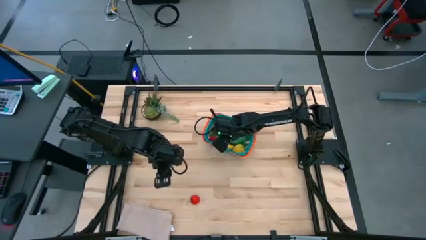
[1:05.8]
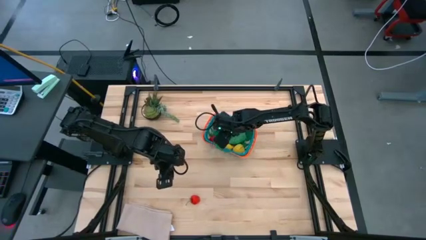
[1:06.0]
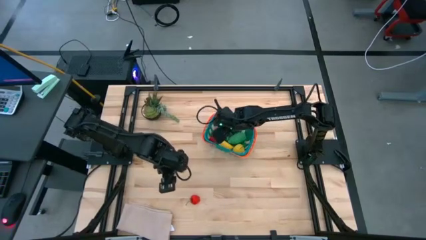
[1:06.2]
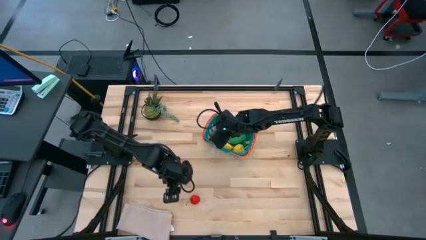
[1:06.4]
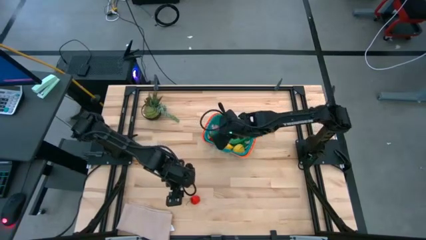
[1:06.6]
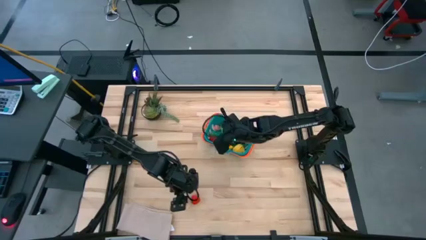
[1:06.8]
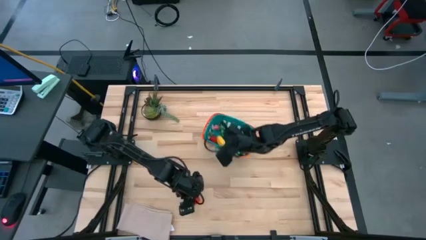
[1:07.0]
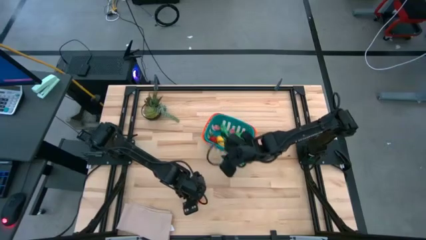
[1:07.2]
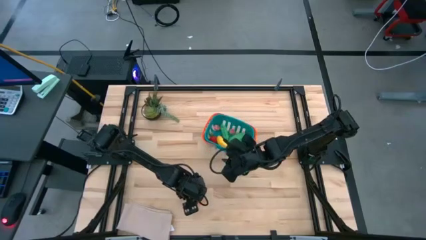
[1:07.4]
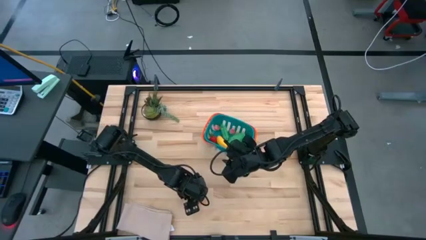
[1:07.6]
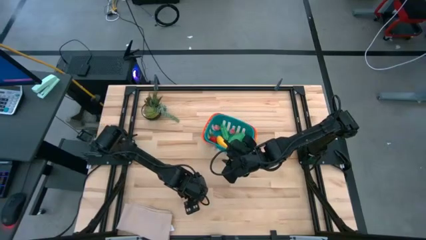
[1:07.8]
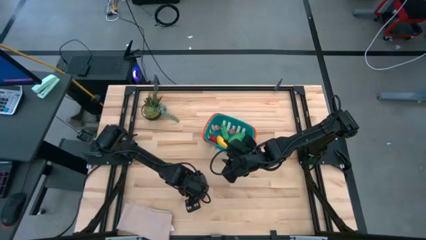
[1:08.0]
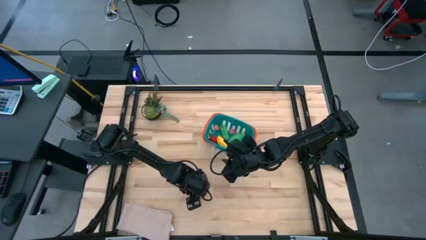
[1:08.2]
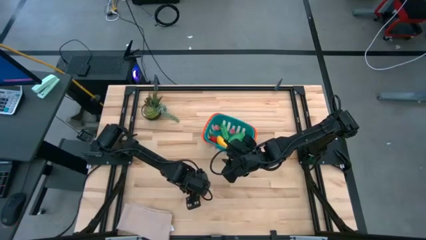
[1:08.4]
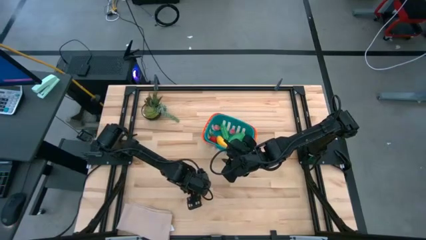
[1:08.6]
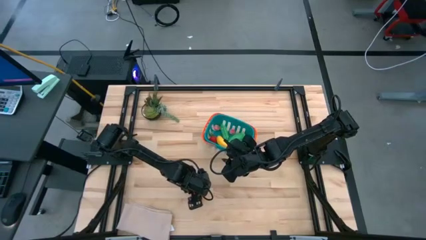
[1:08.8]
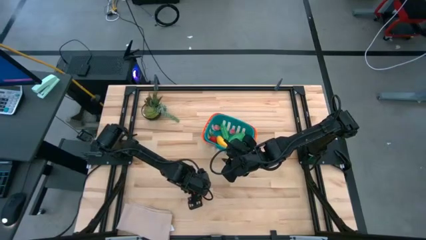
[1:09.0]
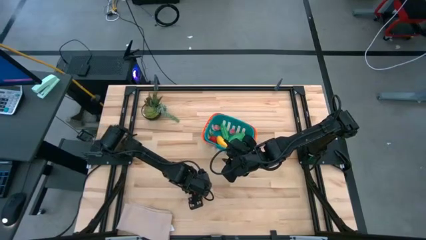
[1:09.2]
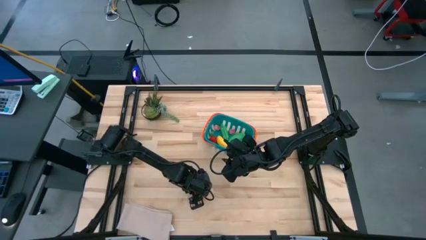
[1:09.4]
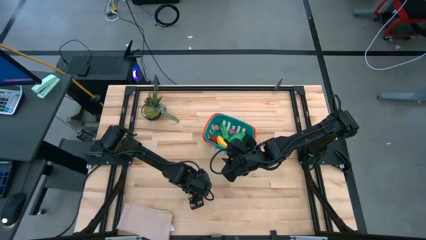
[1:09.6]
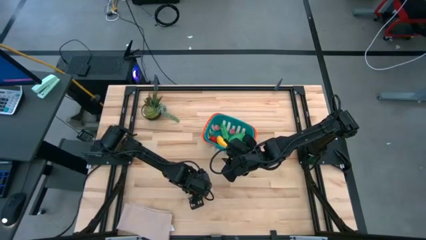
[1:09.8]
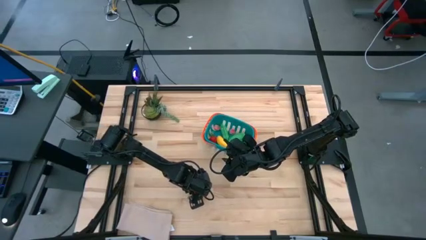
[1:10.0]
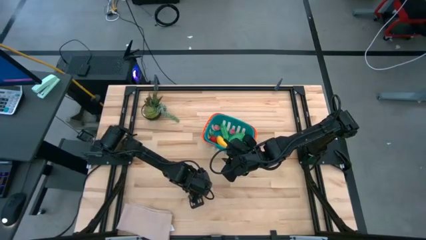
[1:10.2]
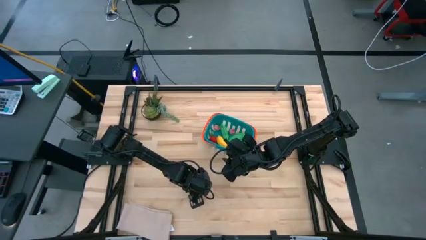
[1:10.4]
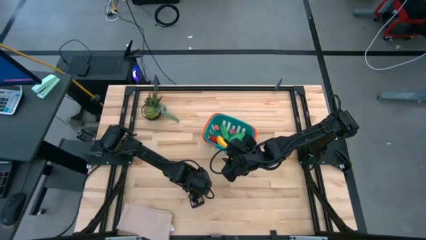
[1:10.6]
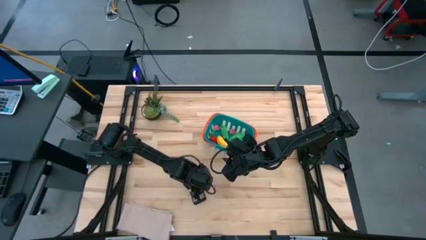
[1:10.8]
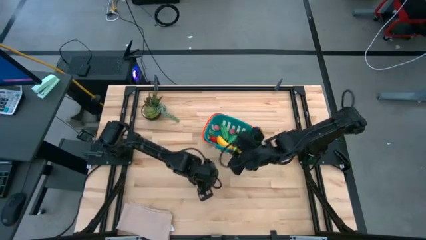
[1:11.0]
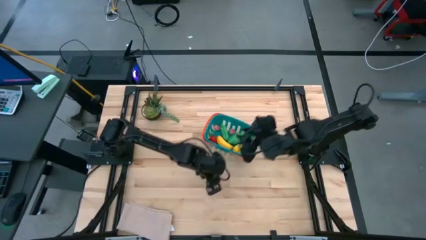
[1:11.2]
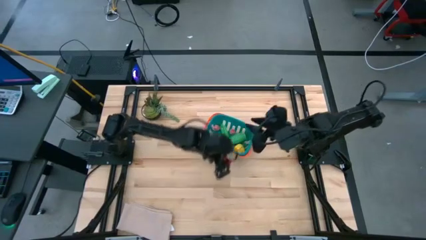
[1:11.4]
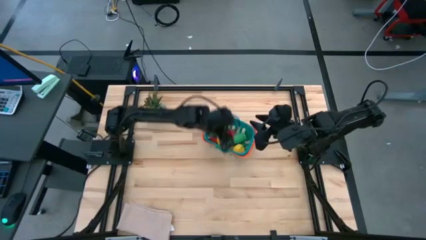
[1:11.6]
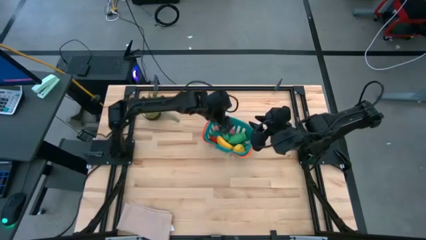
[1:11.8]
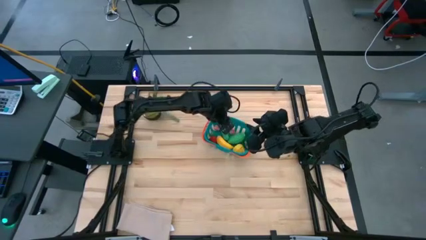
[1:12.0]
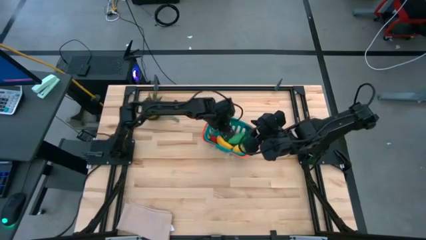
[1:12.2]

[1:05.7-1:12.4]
Task: Pick and placing Produce into tupperware
Put the red strawberry into the blue bin

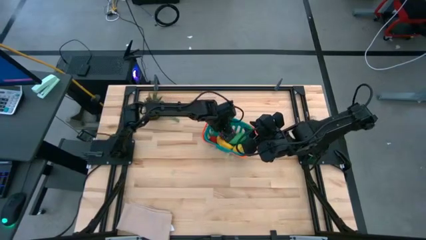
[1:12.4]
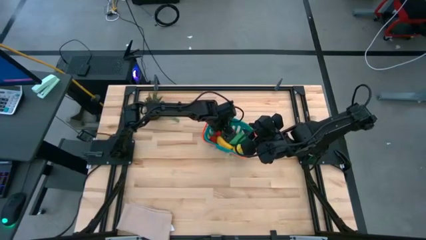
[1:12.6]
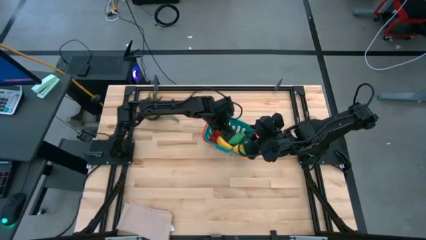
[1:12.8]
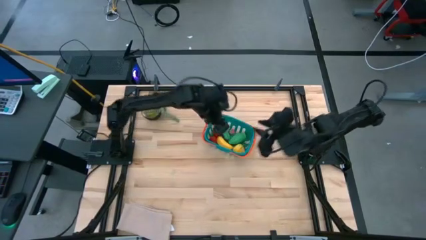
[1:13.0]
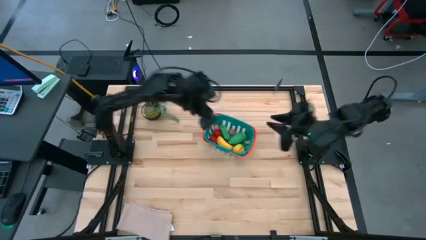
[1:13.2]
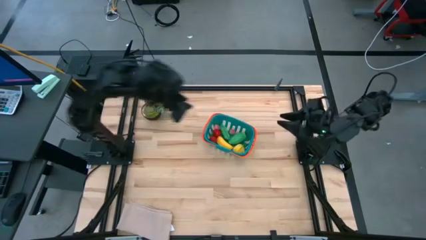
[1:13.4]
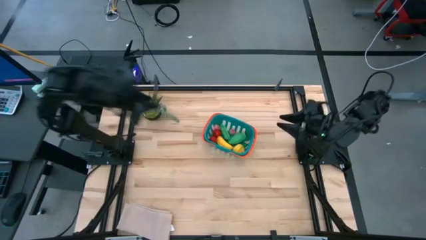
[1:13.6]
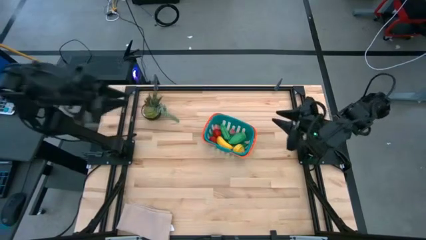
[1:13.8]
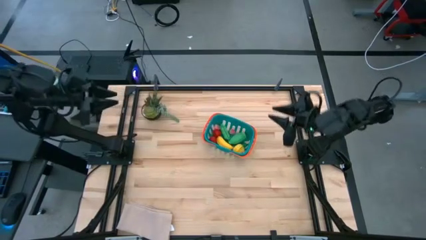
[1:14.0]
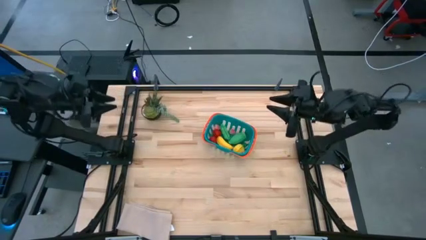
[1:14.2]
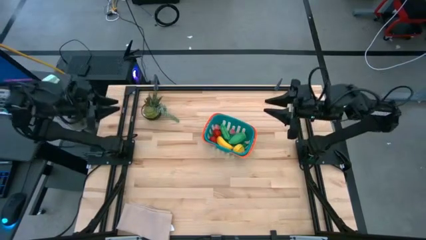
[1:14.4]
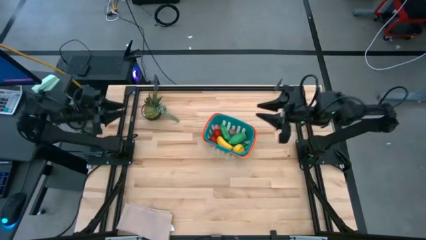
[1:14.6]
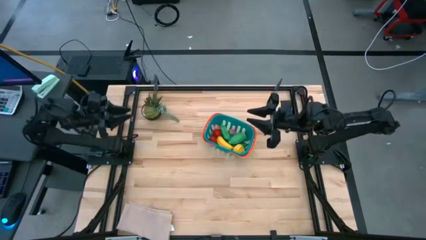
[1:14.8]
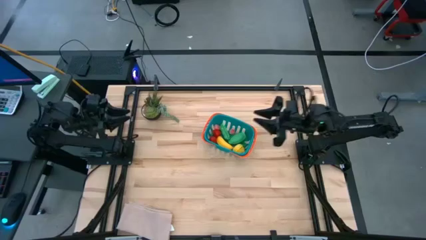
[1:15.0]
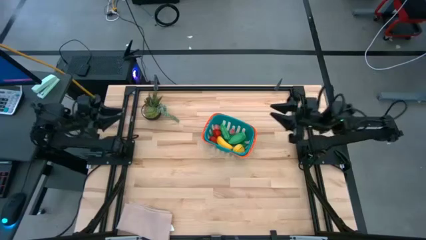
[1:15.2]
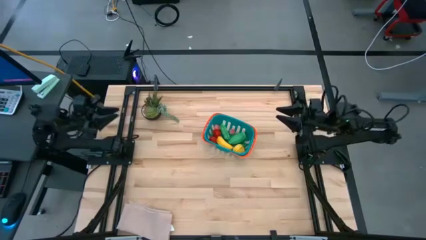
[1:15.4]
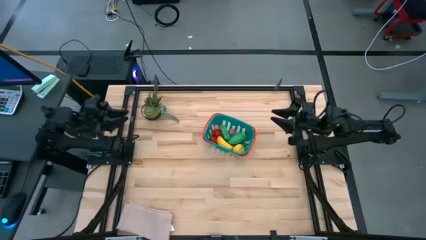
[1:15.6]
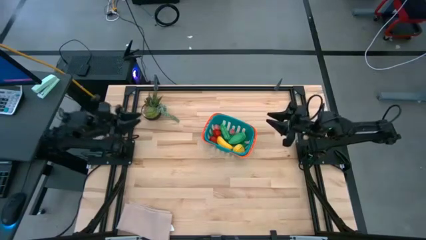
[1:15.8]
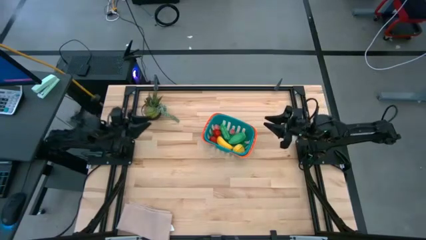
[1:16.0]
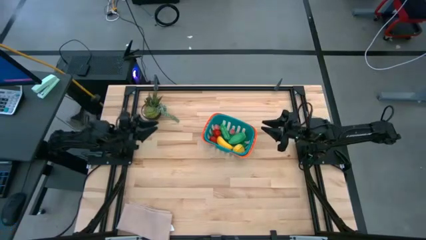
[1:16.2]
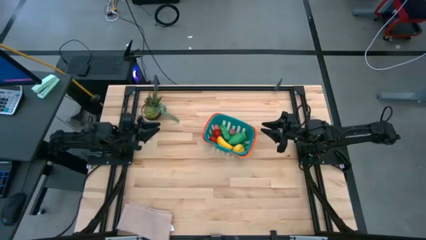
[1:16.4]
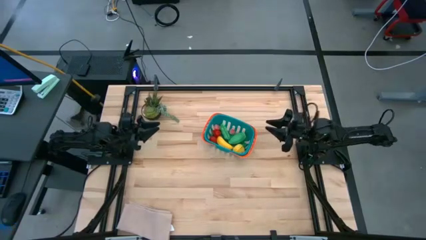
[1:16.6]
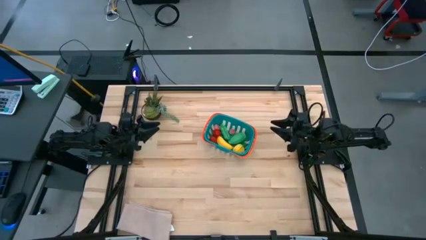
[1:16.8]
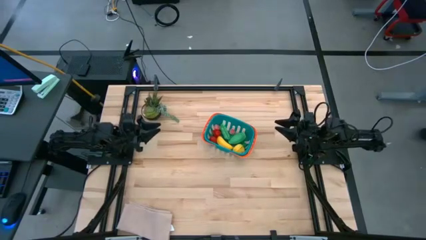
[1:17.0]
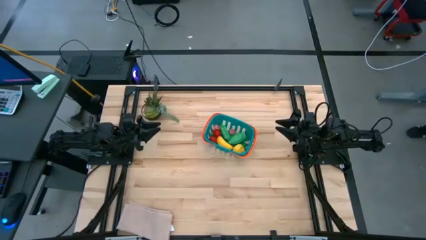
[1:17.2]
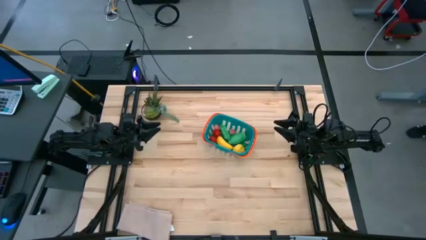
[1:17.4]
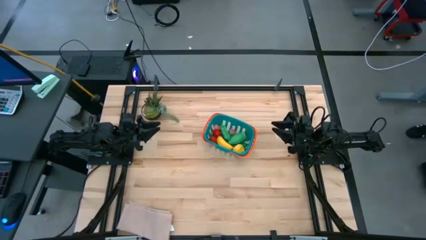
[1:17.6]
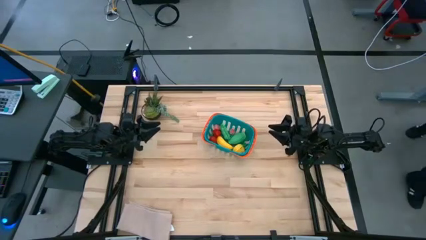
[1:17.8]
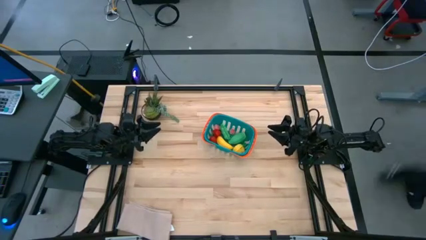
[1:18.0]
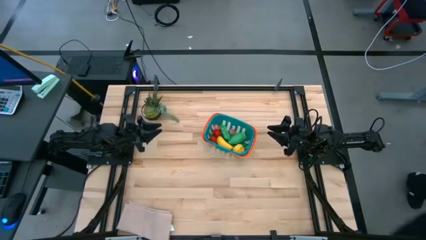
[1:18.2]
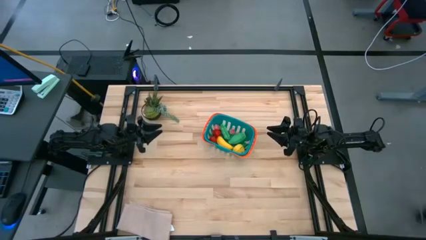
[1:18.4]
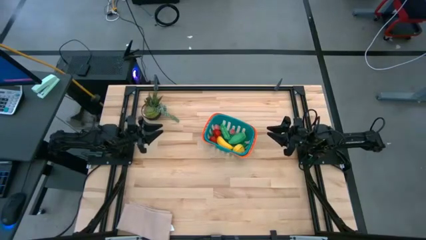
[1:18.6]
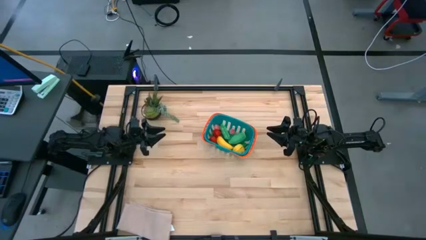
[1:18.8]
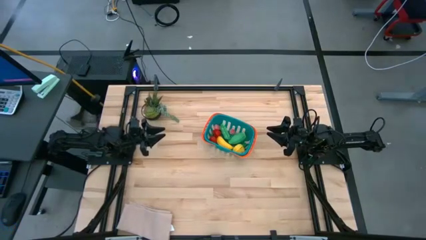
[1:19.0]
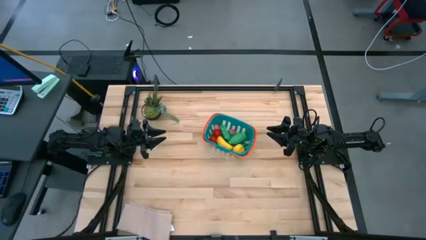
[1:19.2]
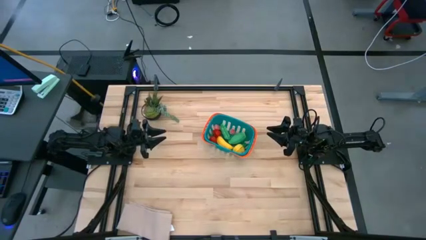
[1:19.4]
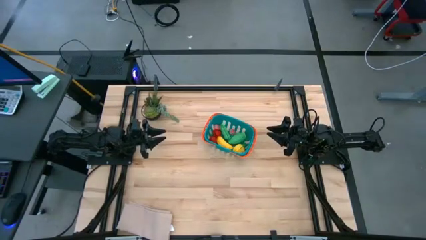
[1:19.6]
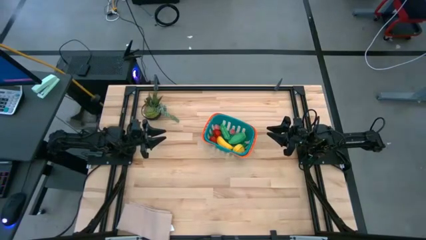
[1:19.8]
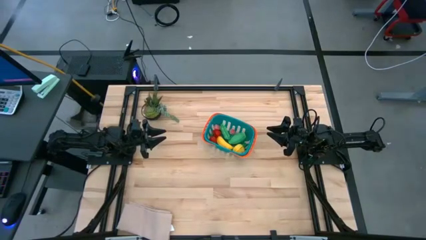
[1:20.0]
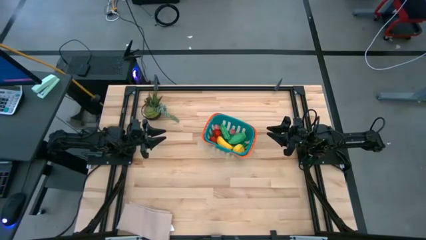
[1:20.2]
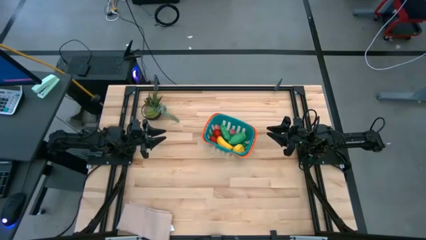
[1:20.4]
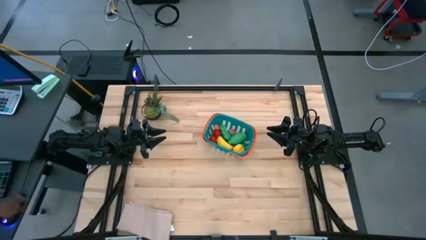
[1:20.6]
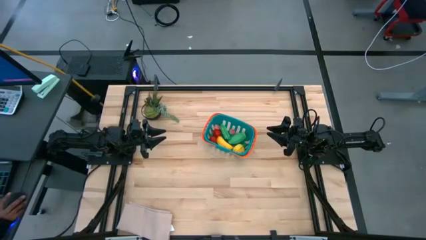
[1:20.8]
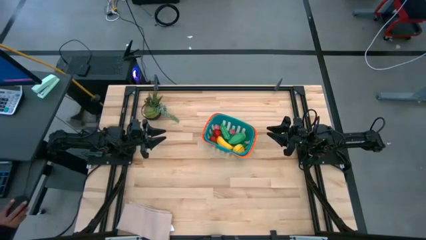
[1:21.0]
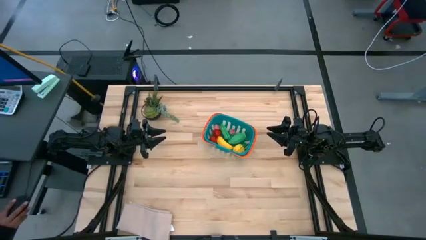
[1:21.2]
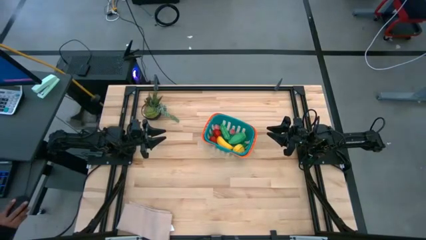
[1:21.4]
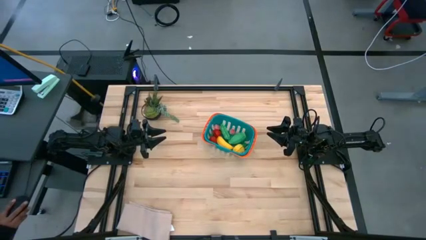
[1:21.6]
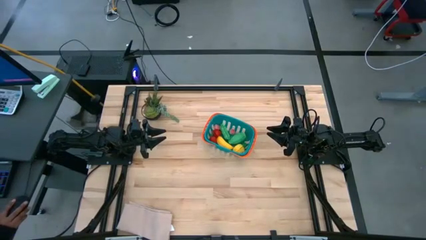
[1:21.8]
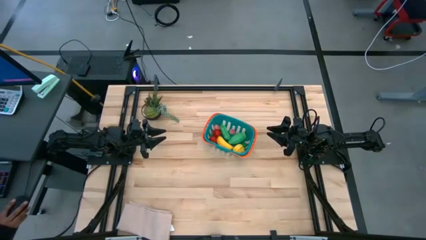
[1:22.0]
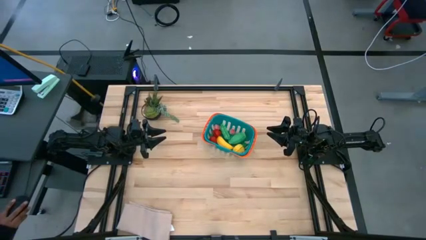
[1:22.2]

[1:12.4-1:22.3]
Return to Home Position
